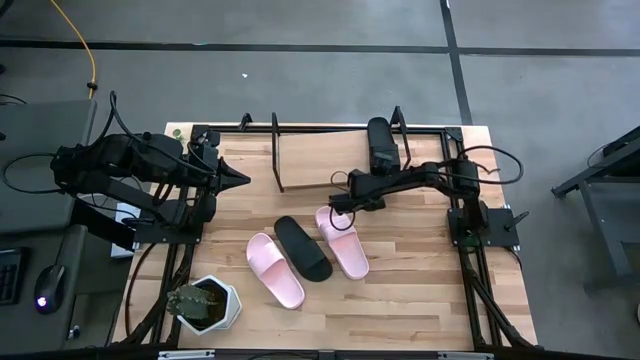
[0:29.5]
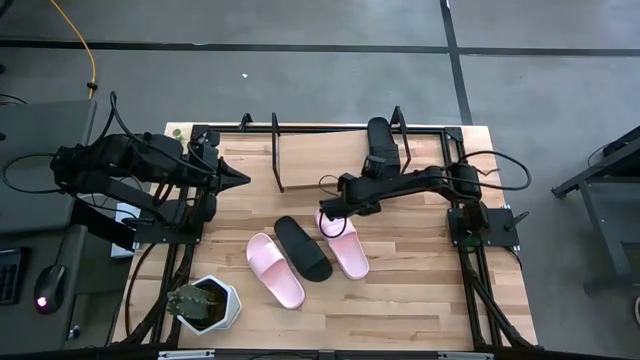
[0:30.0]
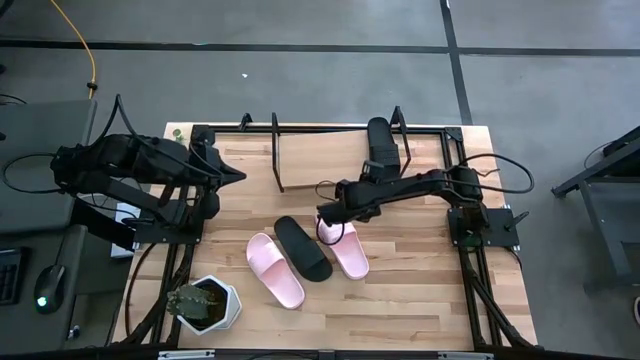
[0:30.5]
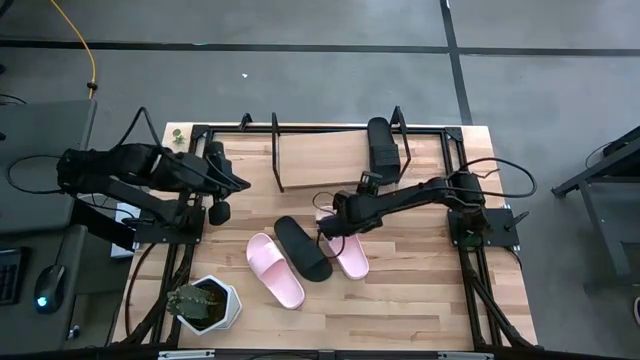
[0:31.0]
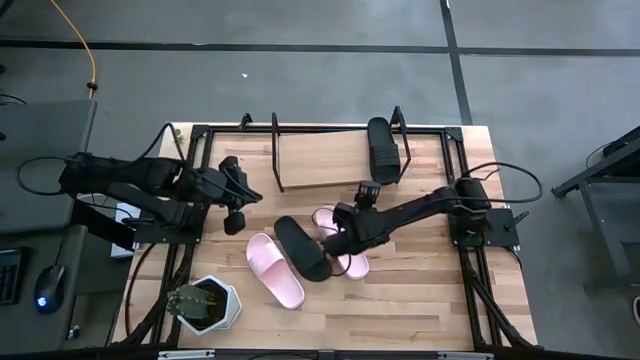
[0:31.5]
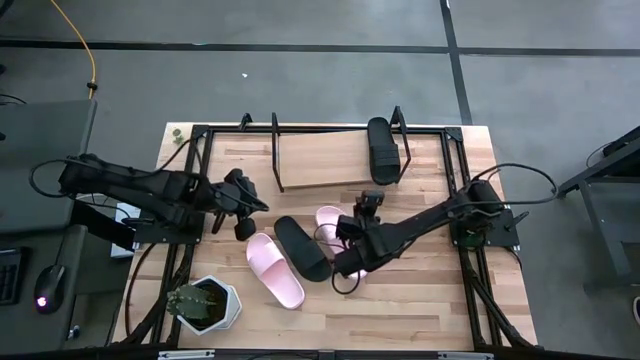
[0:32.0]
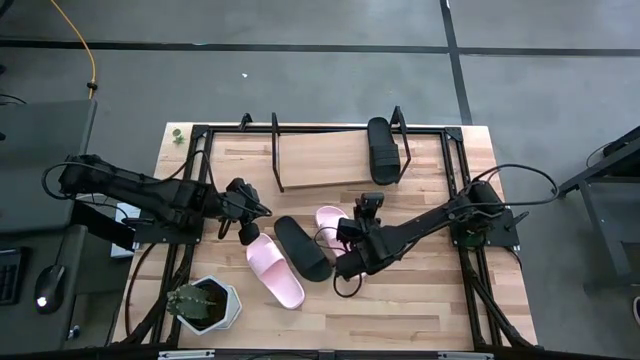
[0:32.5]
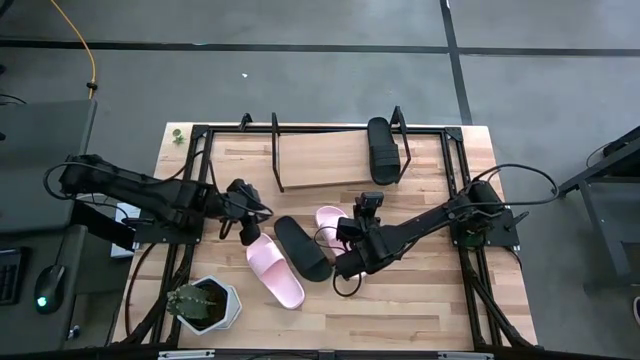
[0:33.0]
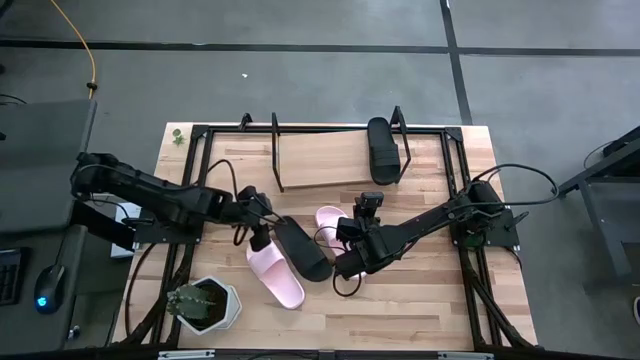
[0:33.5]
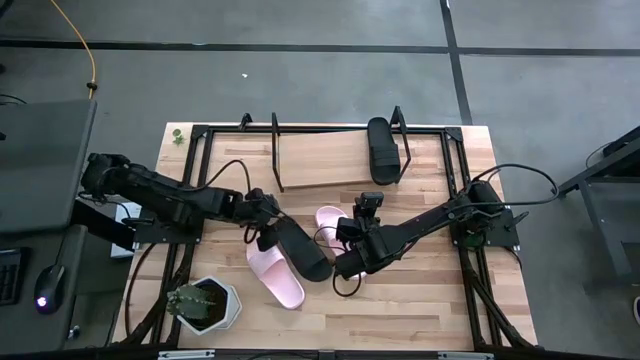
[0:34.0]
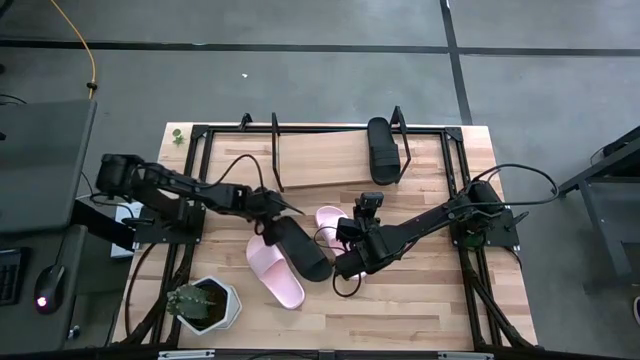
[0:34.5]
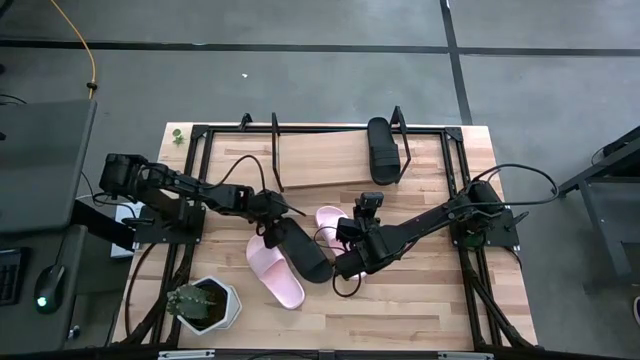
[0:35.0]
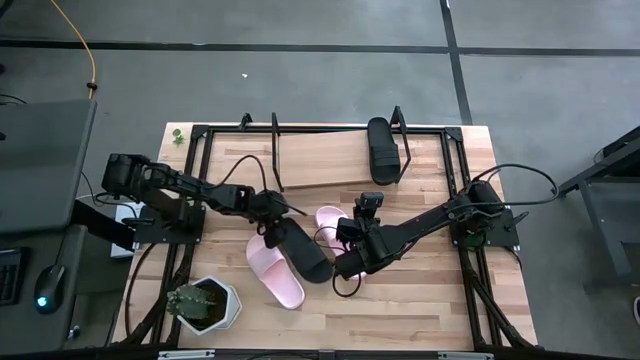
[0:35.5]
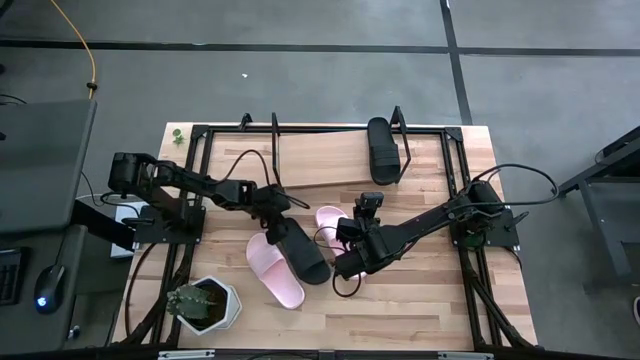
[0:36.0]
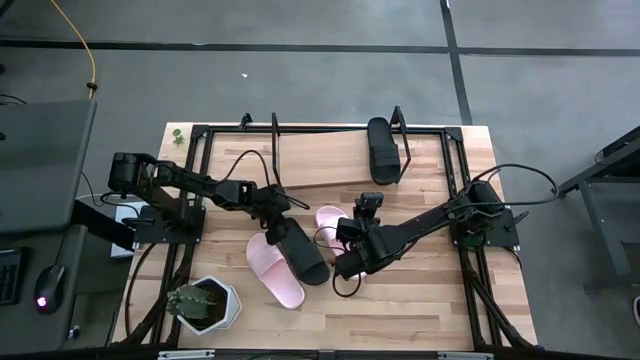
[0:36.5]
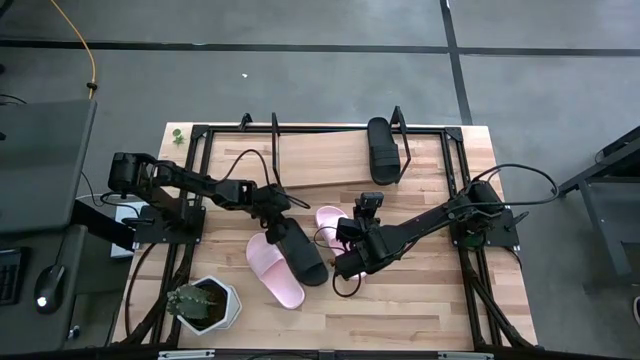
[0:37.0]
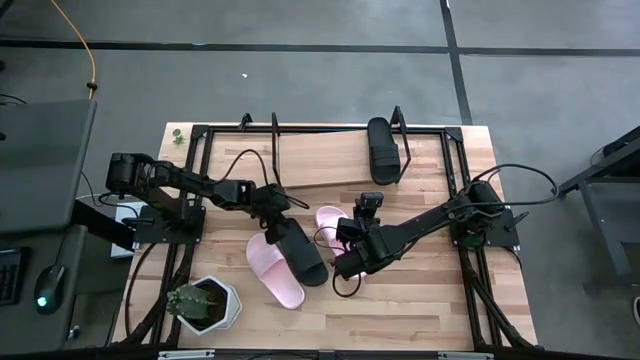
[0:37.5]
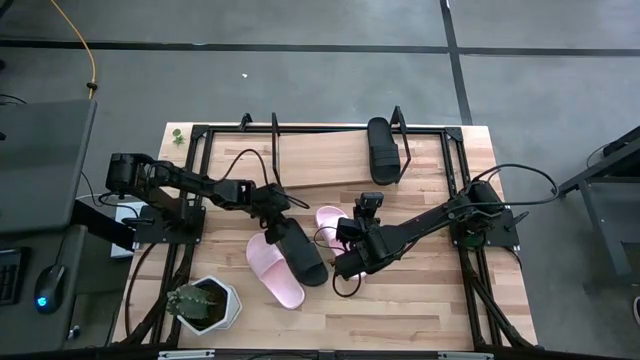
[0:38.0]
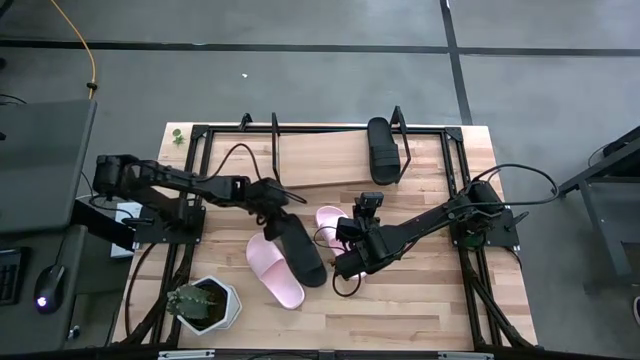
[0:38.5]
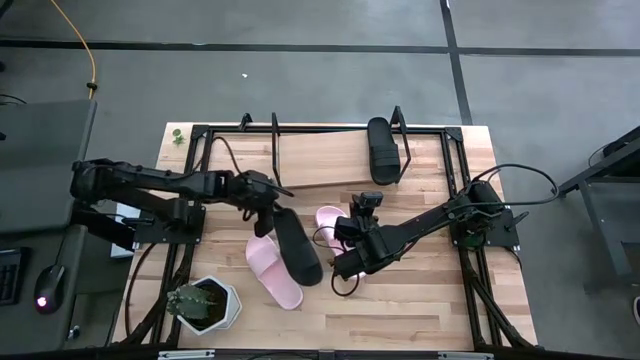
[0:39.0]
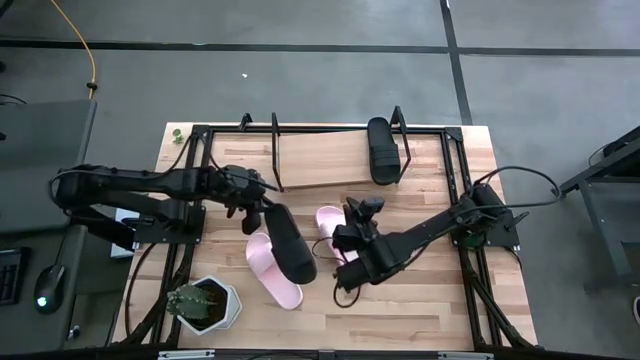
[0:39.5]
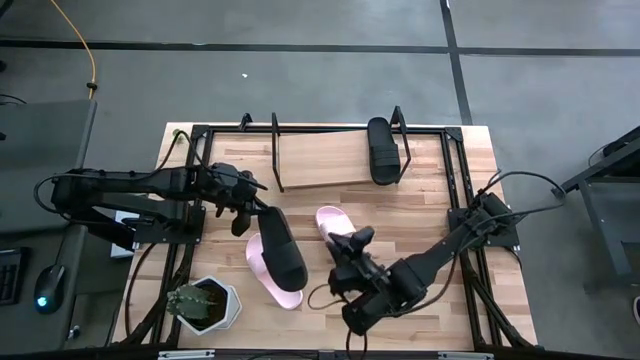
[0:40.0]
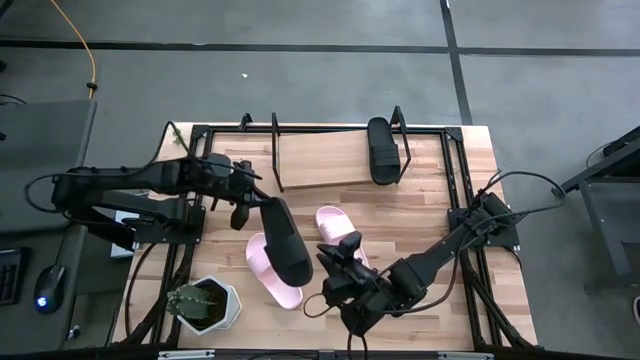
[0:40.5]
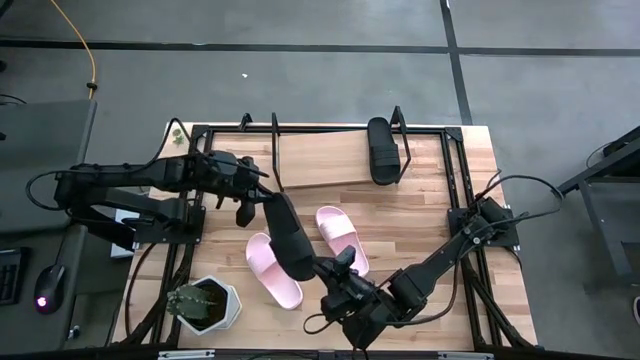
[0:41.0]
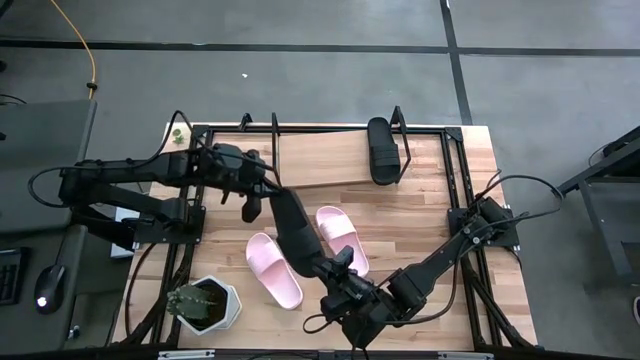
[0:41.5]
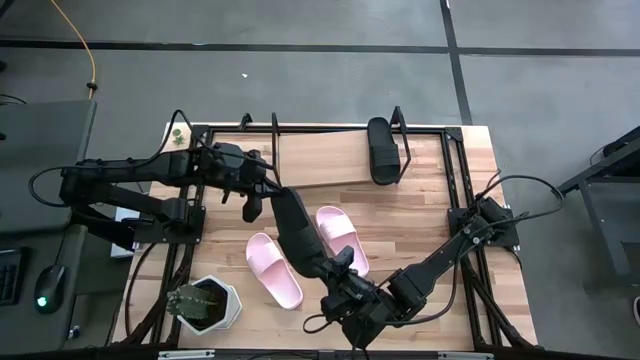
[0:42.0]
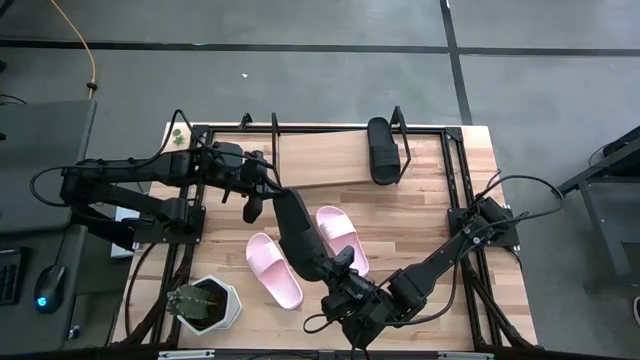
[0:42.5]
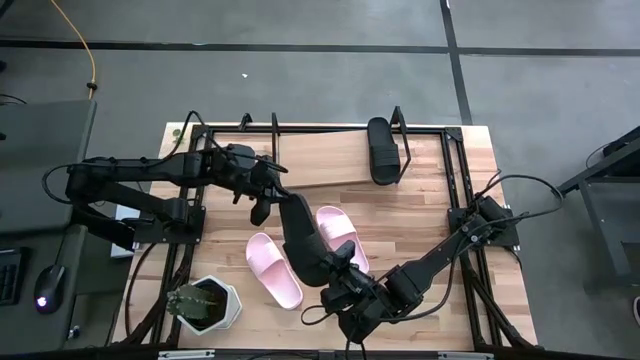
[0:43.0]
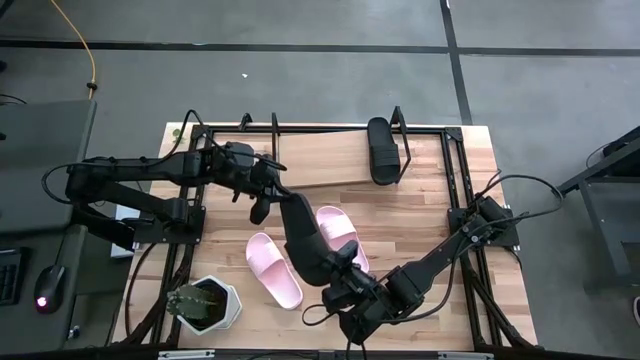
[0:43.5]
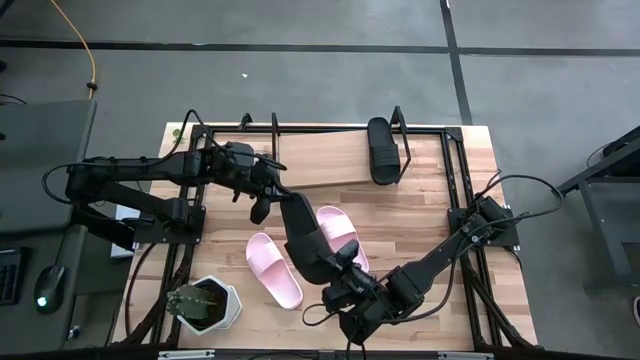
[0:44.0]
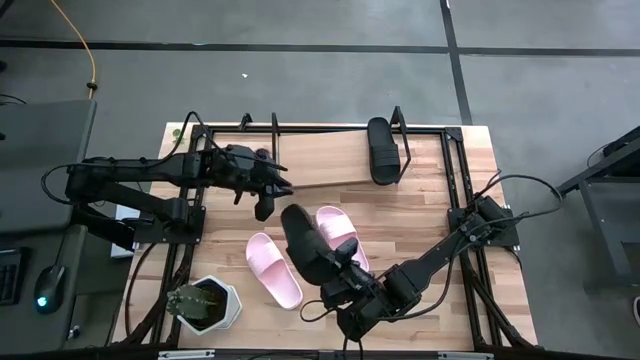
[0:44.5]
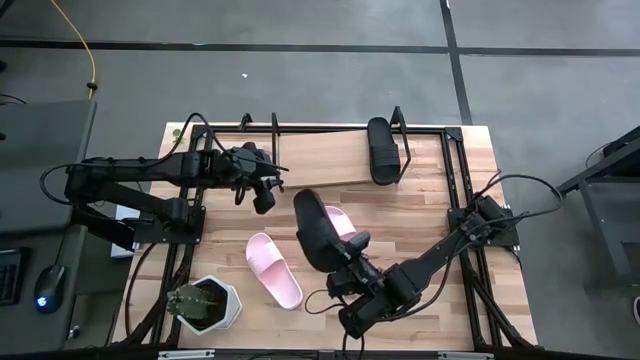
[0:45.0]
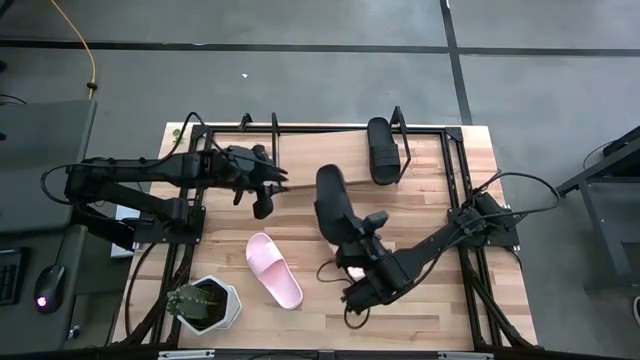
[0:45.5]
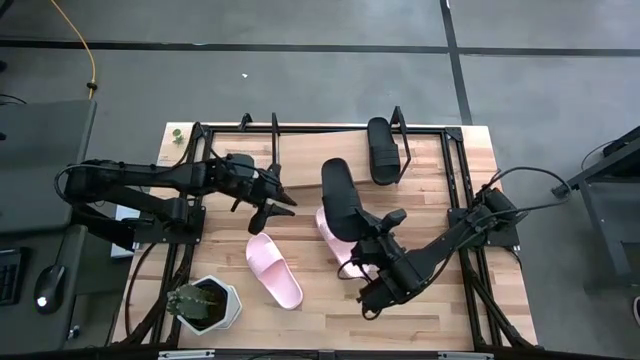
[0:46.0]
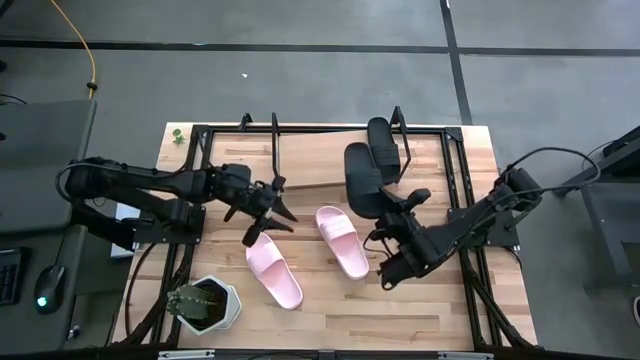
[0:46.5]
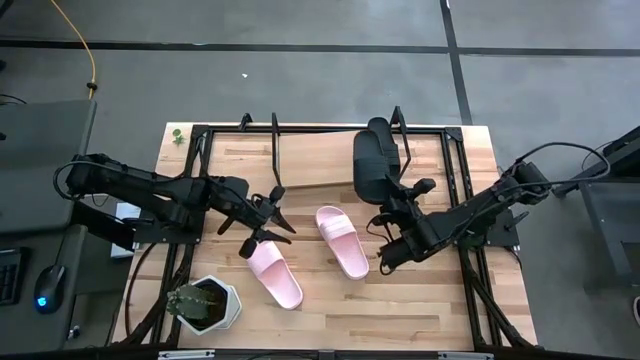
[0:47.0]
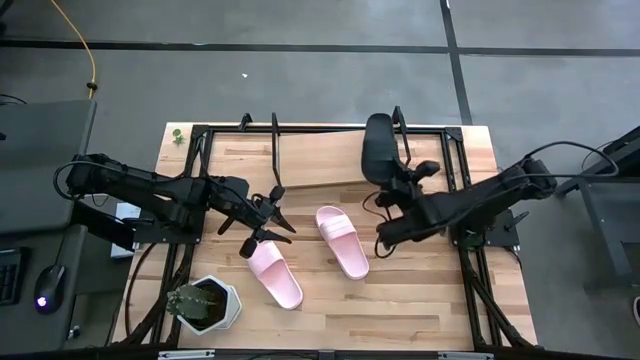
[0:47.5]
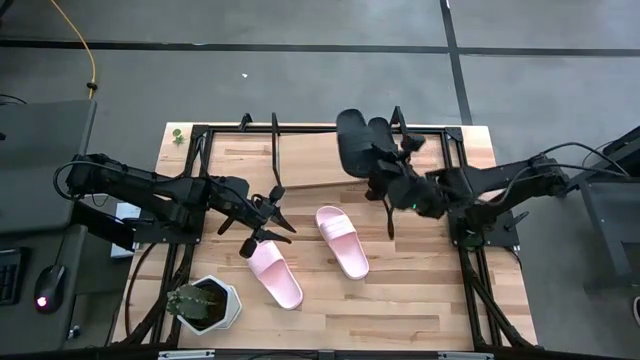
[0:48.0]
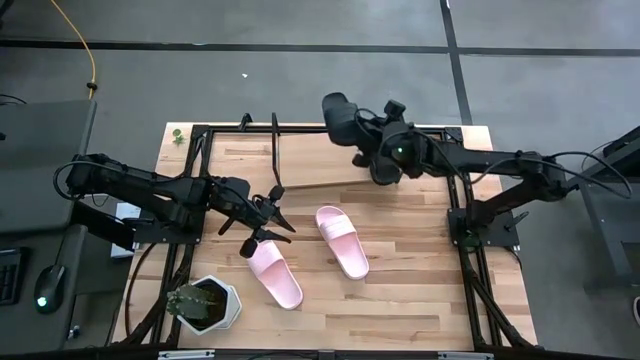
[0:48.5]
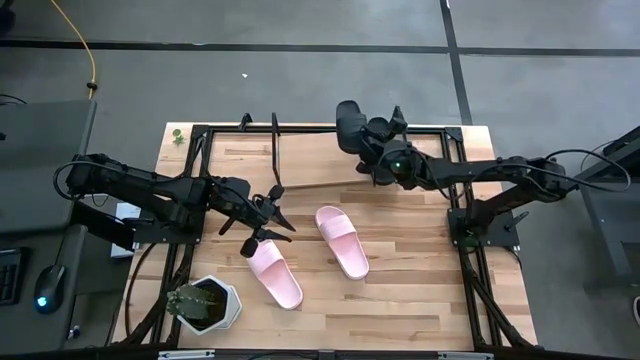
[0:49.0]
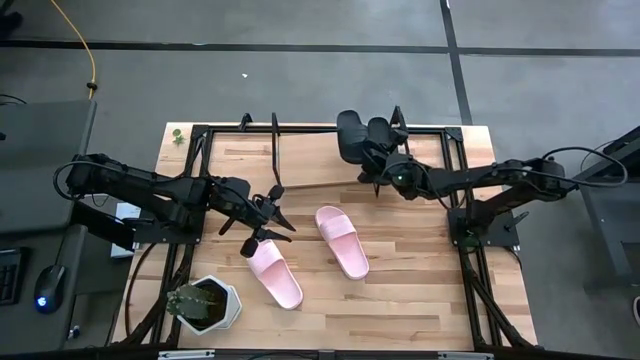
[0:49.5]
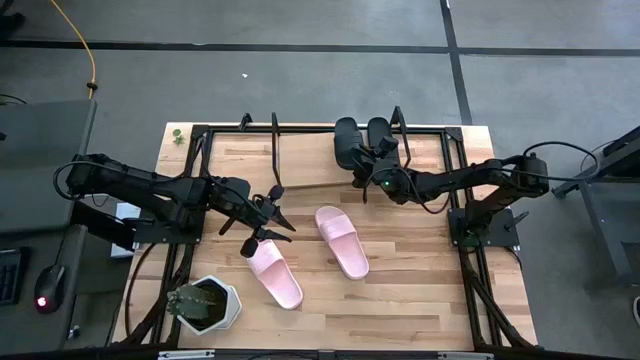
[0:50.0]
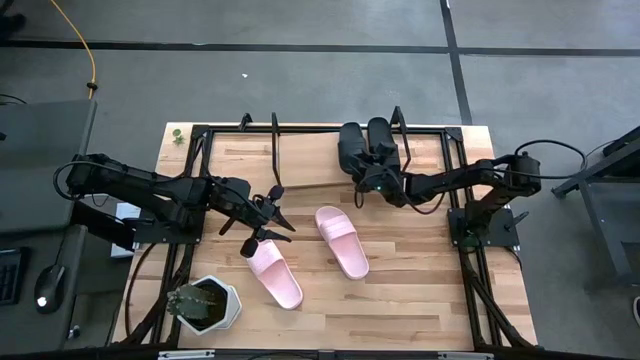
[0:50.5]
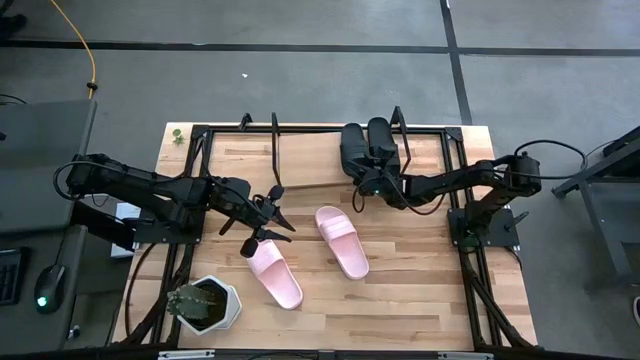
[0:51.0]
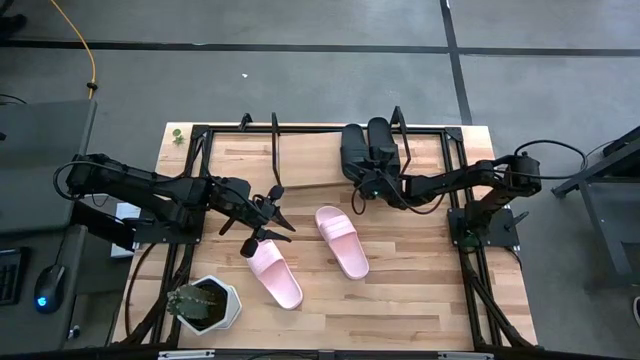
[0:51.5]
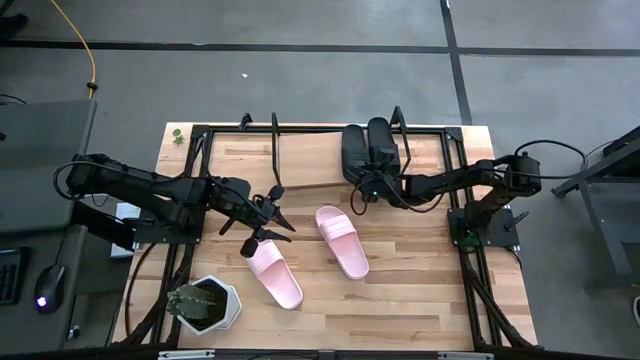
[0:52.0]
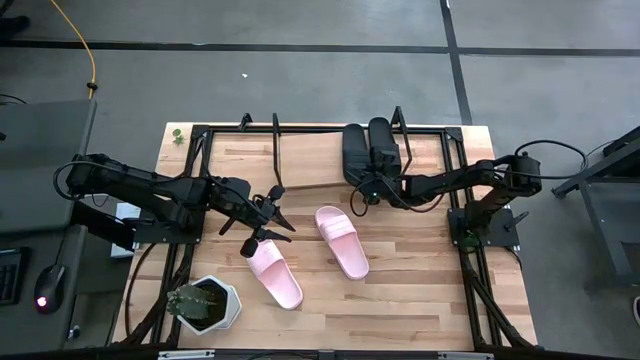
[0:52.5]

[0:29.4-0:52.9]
Task: Pick and place slides into the shelf
Put the black slide on the shelf
